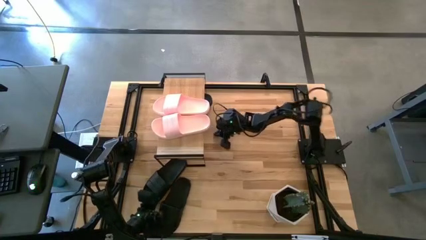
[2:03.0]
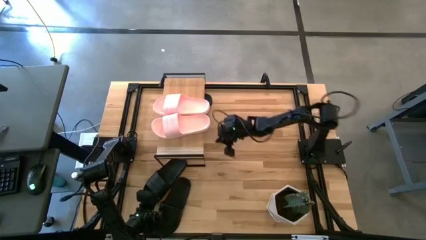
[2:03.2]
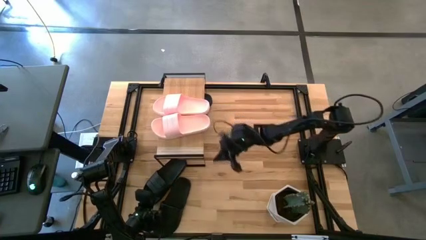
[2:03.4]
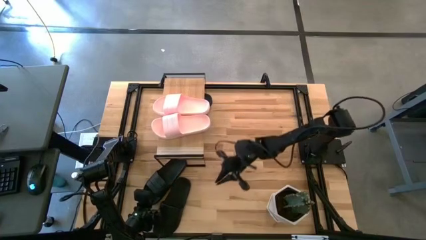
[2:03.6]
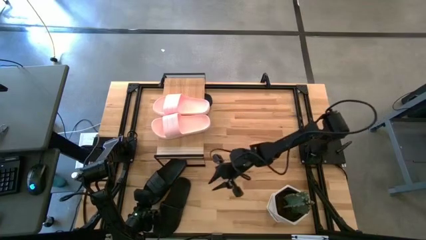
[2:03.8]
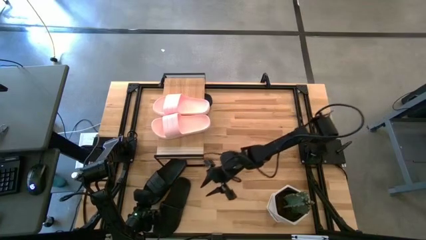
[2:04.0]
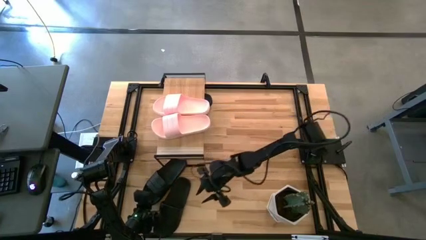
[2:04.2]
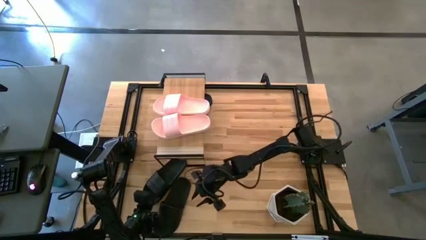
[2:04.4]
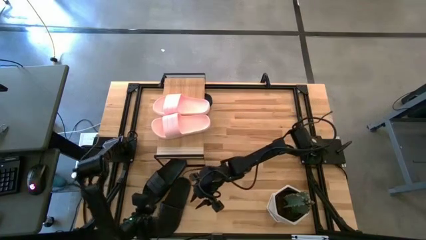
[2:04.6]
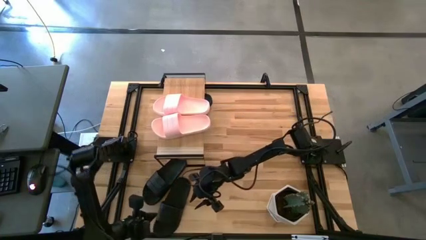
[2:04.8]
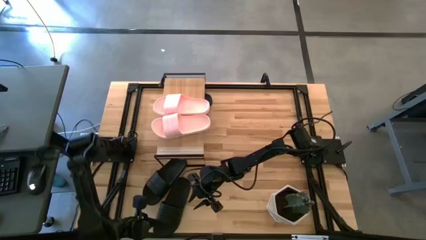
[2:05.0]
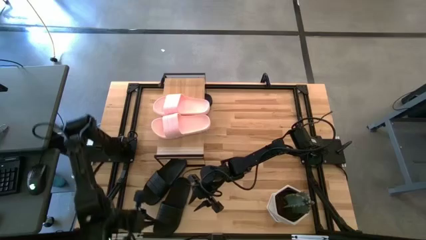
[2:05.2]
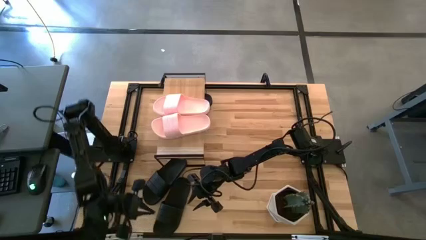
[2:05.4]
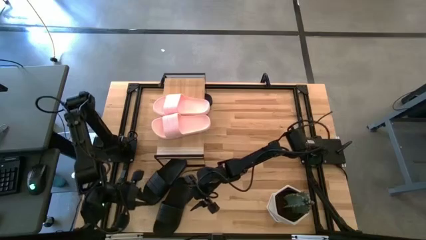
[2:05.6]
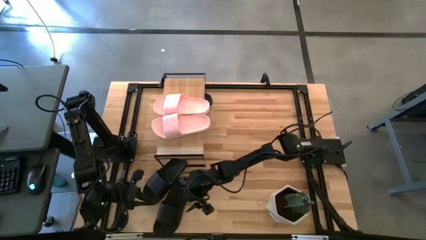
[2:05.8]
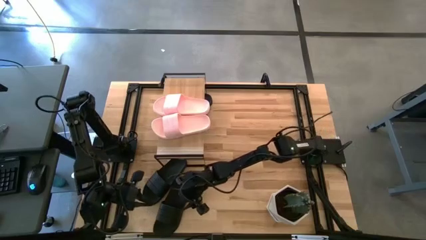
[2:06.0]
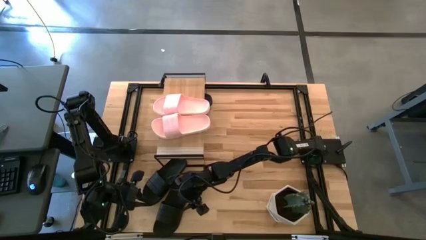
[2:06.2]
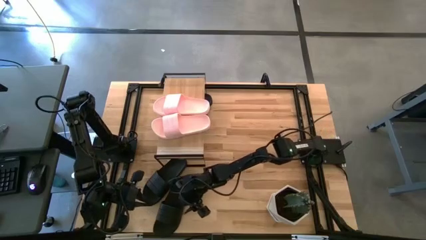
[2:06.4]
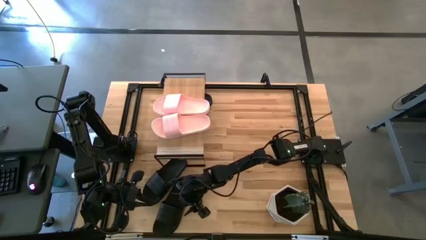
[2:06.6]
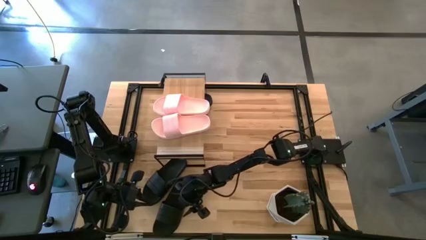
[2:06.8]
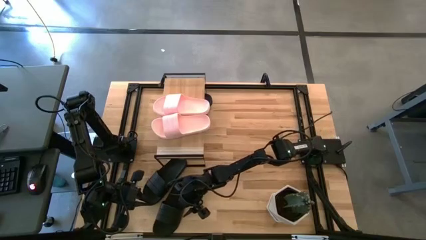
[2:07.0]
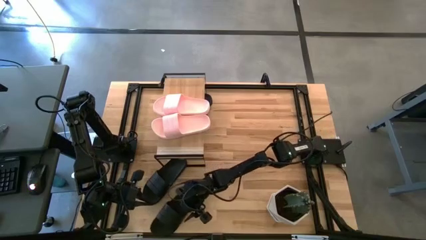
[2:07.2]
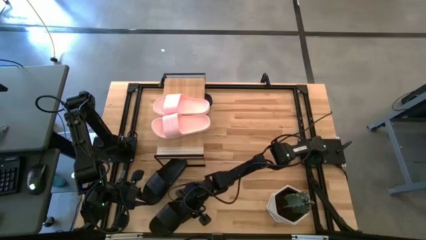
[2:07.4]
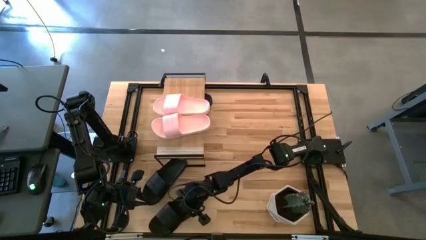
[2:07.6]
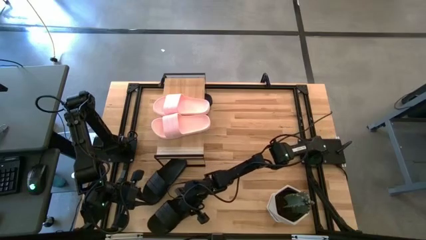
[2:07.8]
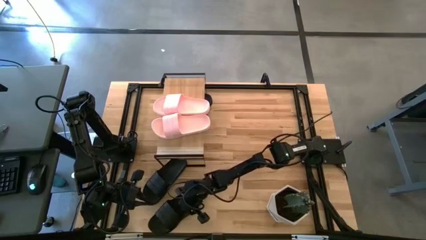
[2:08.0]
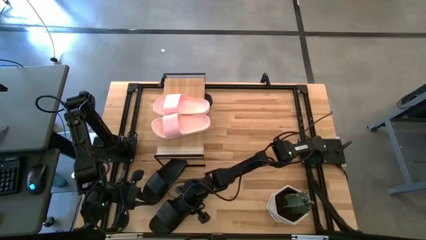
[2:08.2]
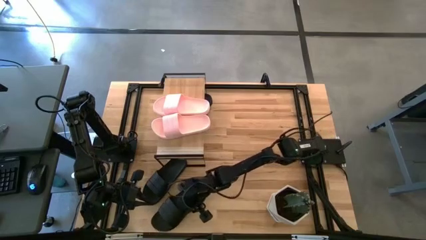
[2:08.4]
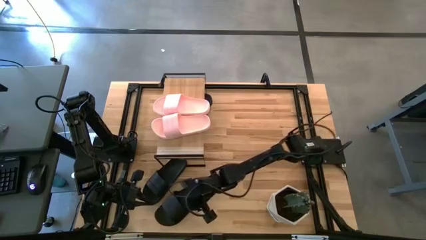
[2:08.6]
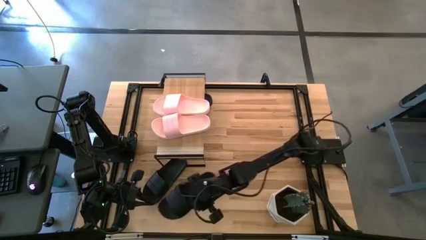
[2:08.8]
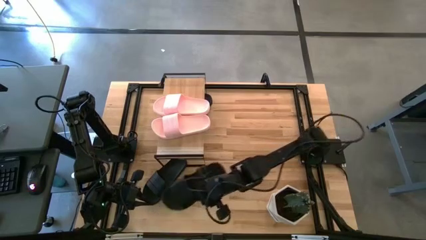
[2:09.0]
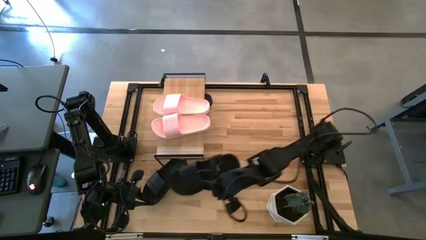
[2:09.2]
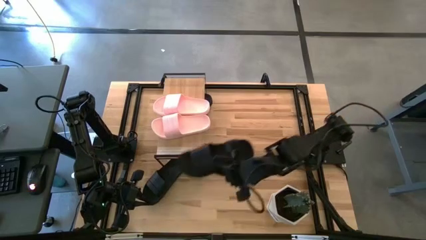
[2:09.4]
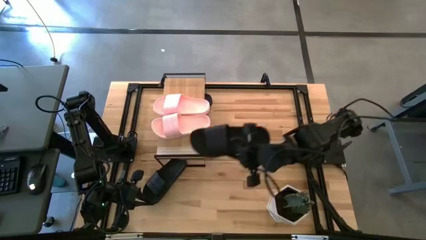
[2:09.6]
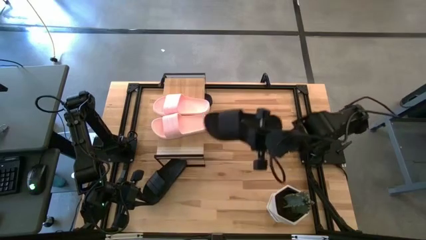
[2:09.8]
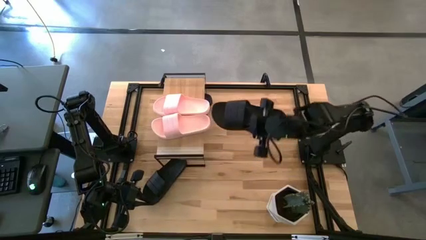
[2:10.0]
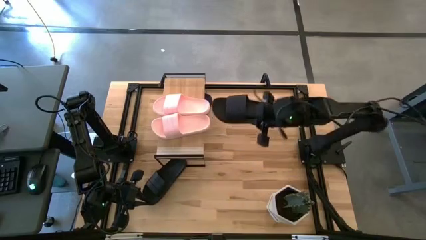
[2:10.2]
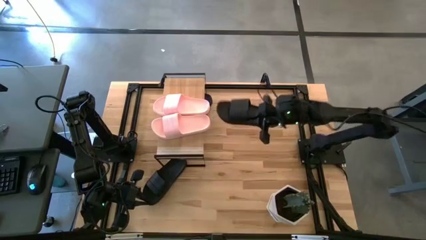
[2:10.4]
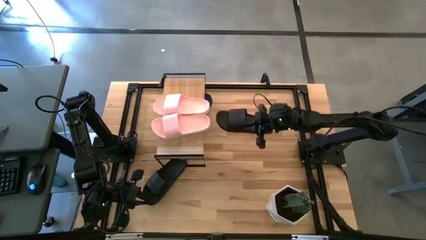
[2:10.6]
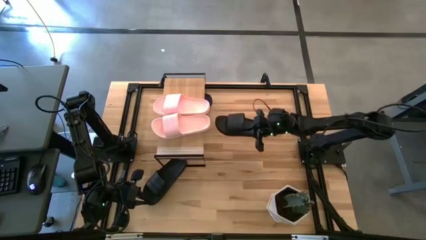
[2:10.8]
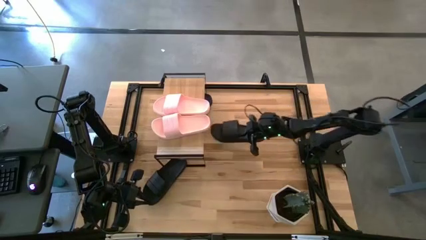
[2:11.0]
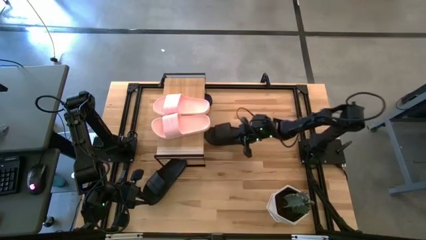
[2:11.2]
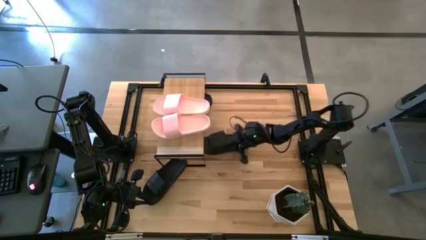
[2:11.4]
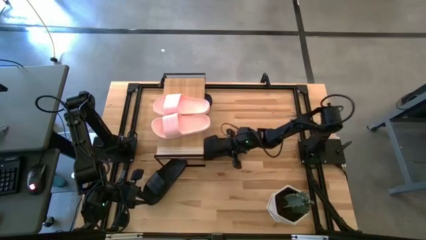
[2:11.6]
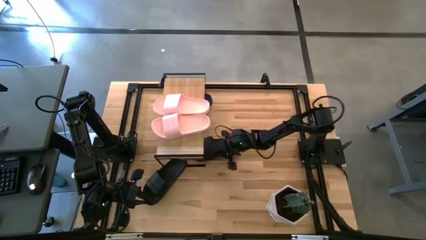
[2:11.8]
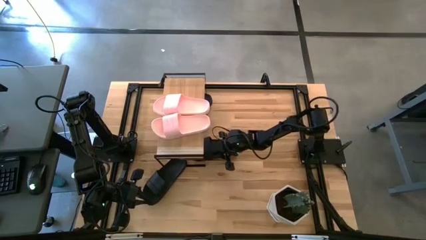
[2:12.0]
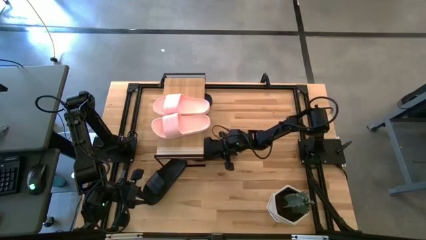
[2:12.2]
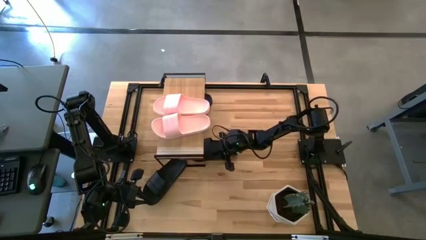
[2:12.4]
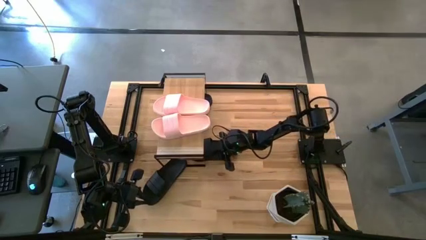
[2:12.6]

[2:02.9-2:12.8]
Task: Pick and place slides into the shelf
Put the black slide under the shelf

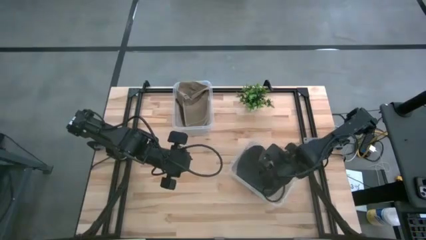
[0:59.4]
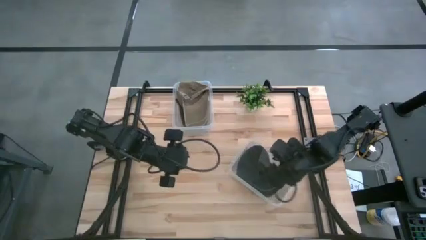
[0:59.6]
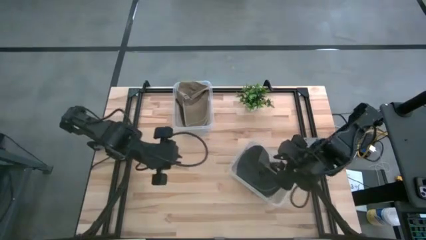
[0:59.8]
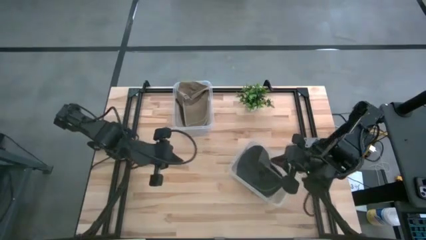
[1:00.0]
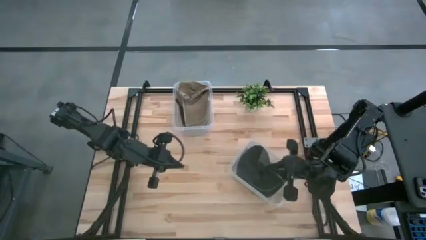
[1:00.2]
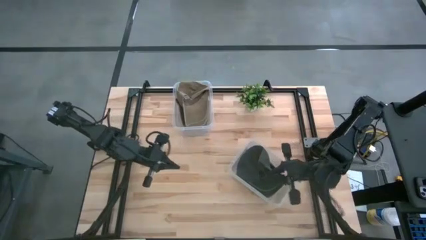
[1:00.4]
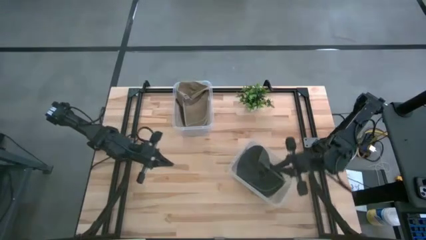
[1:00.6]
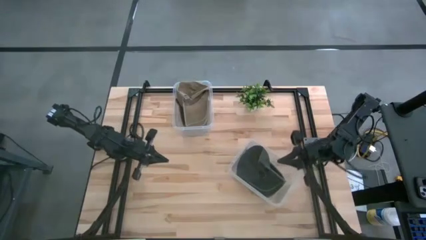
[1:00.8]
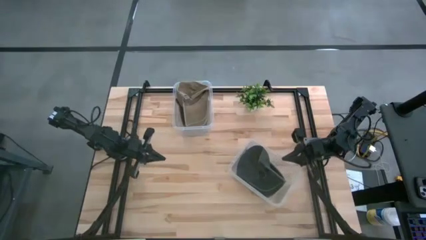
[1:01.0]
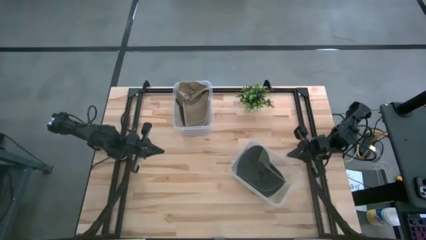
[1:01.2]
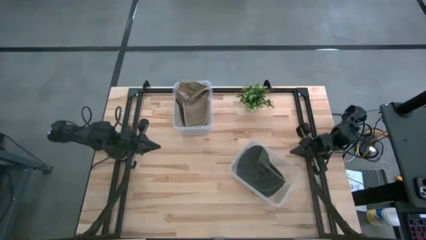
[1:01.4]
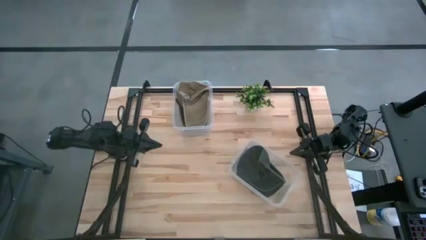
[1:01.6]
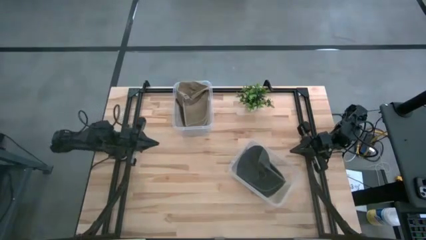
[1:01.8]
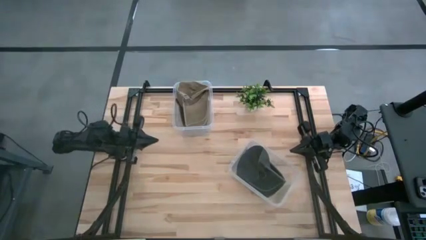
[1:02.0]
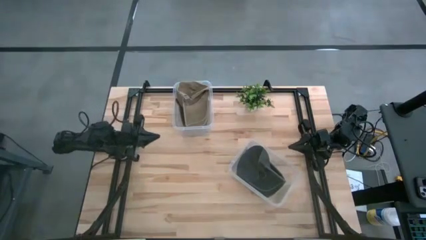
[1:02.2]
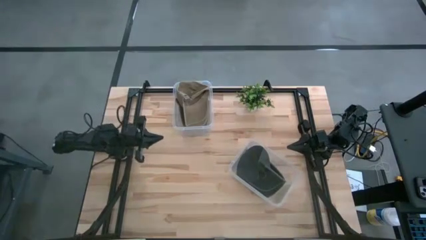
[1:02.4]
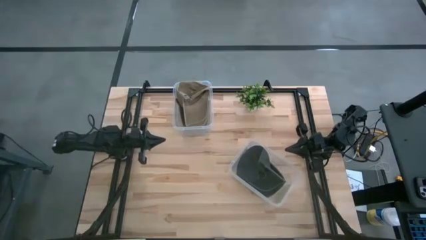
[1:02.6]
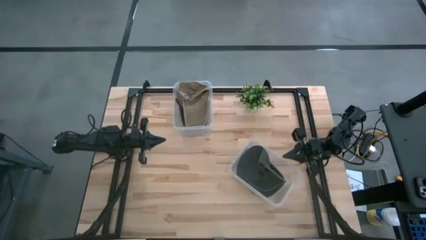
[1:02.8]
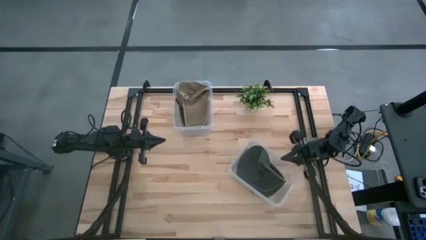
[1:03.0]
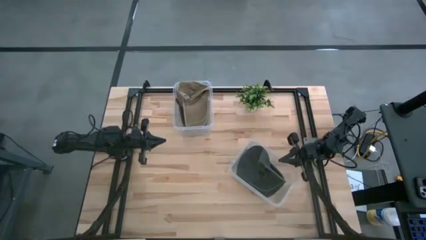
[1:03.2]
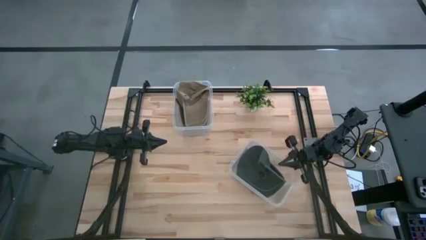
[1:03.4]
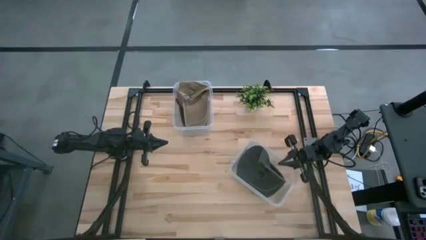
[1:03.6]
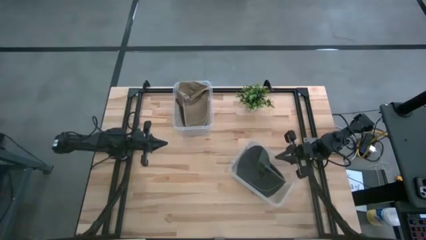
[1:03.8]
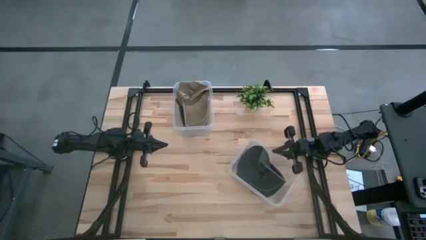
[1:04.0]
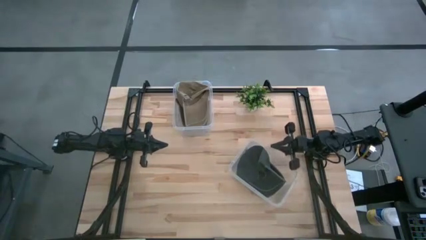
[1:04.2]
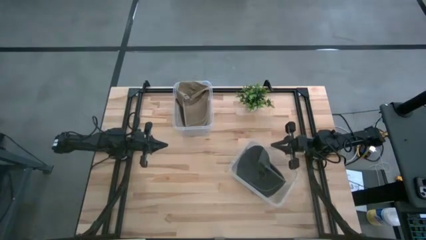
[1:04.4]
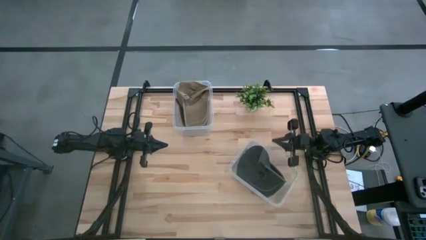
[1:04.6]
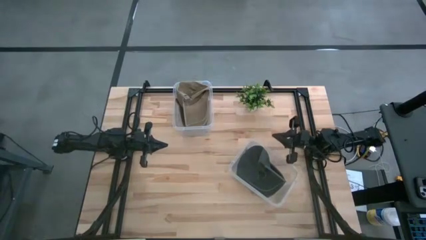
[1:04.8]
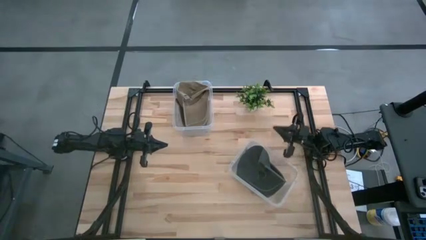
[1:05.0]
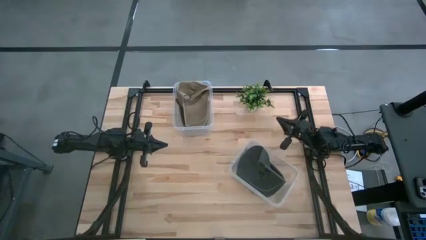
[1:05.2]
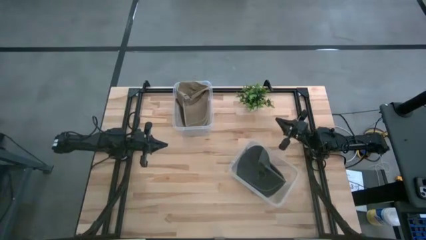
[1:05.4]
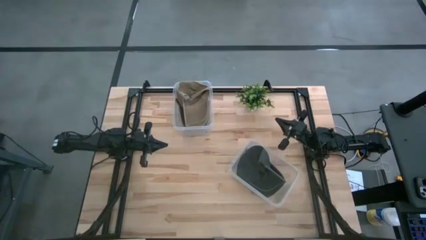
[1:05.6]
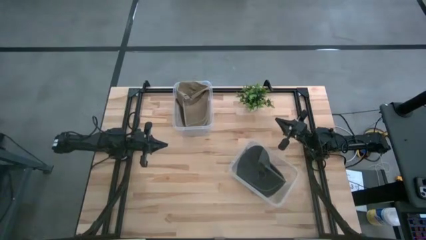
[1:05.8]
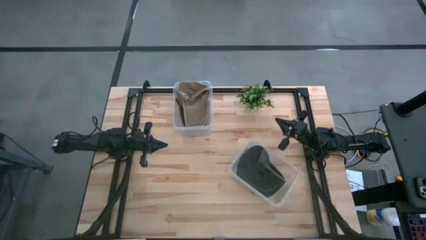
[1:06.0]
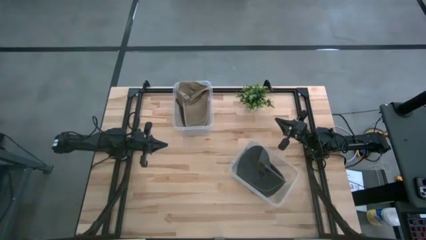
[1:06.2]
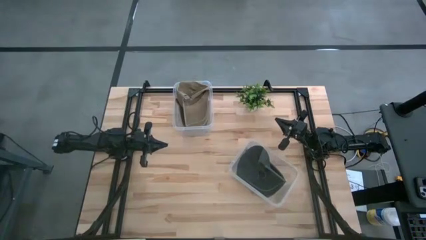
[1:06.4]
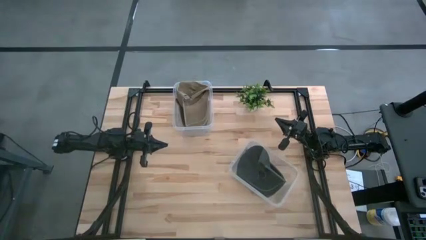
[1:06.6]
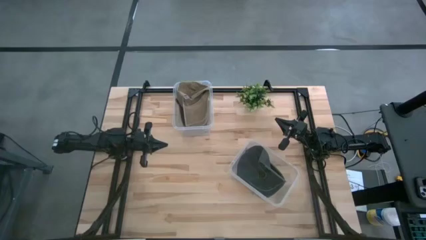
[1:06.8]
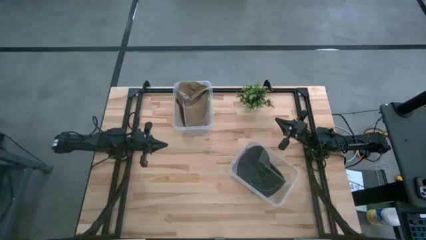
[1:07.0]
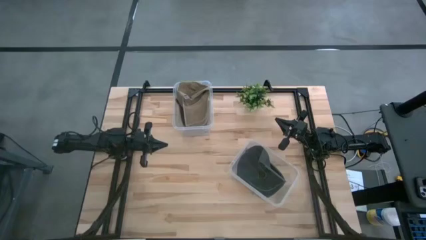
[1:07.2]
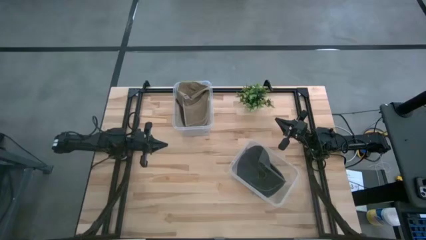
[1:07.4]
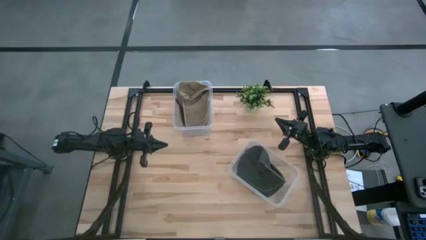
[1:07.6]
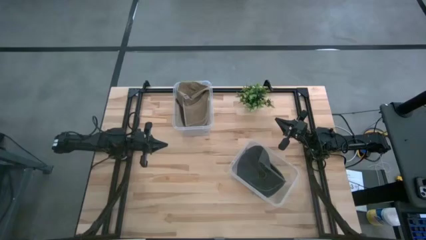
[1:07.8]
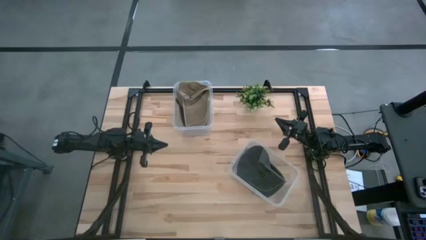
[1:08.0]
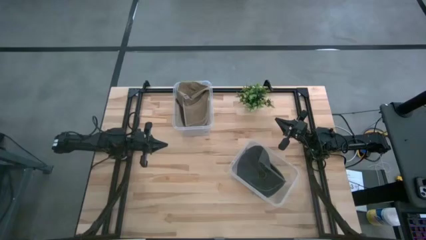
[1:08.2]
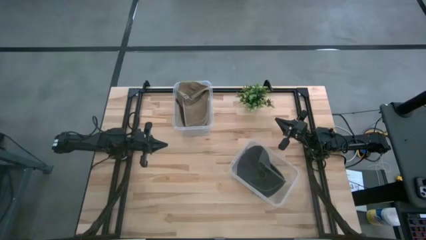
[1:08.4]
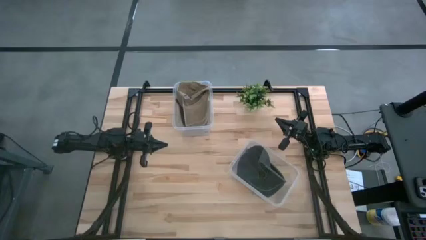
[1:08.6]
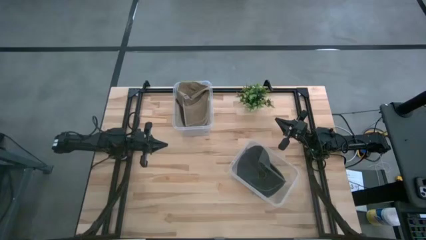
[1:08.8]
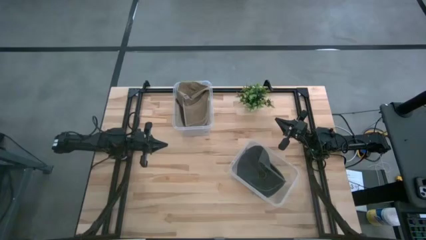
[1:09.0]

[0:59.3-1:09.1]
Task: Pick & Place hat
Return to Home Position
